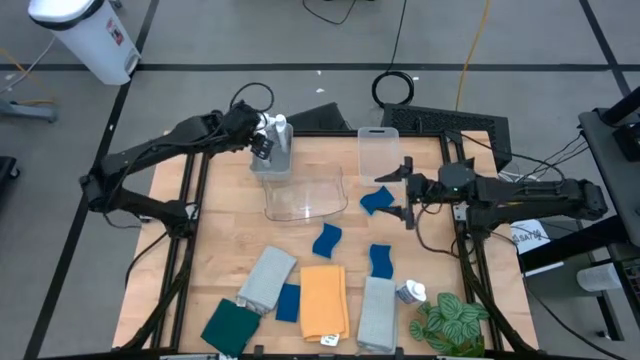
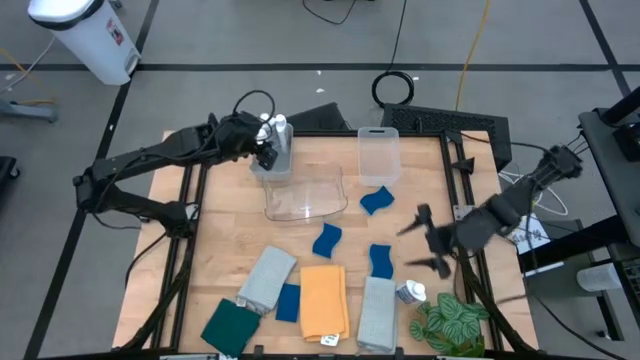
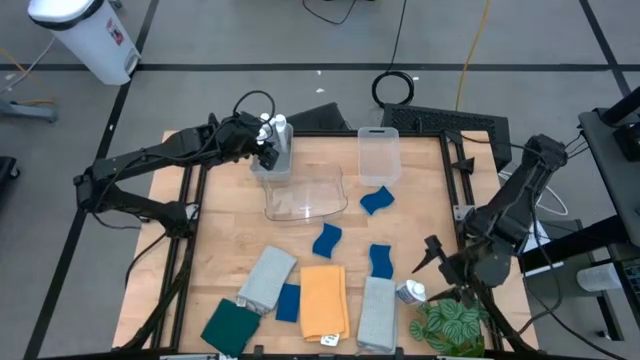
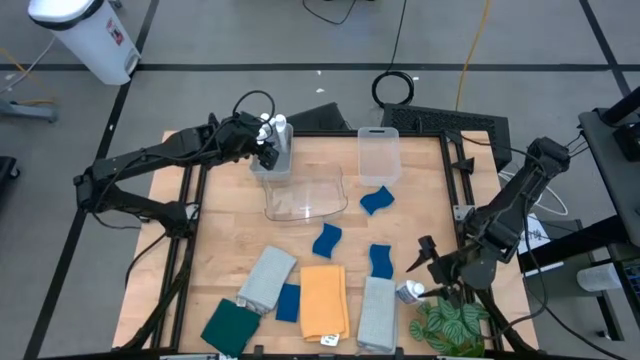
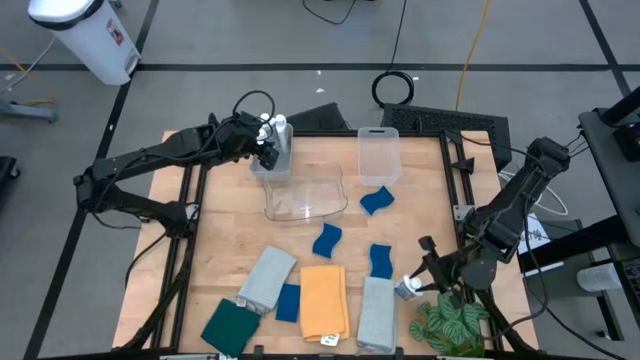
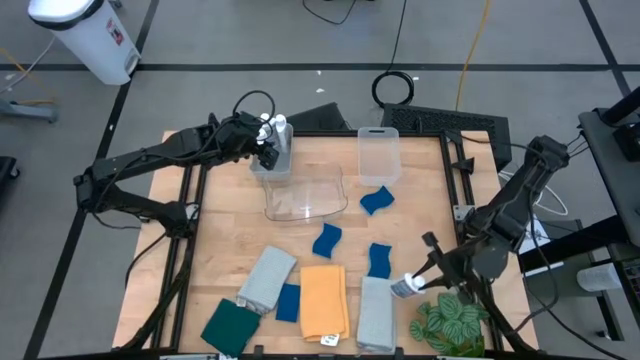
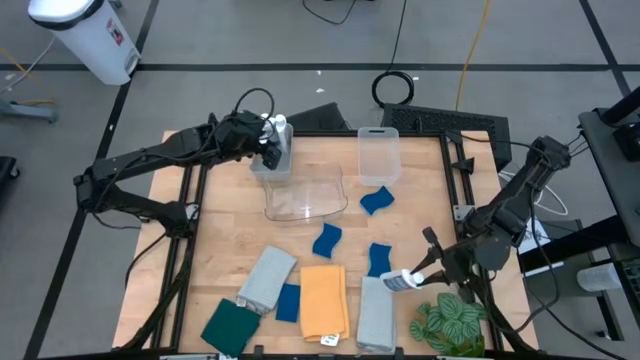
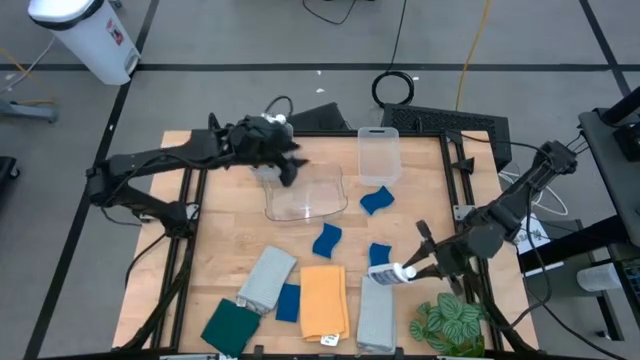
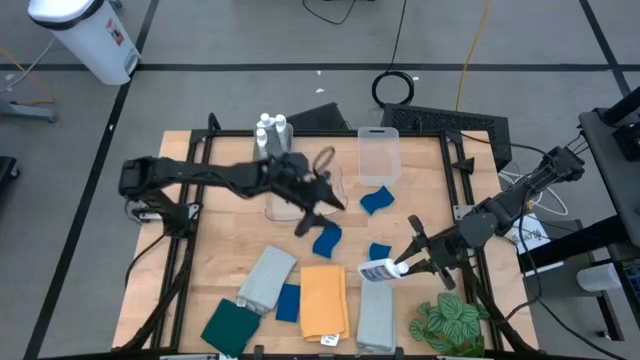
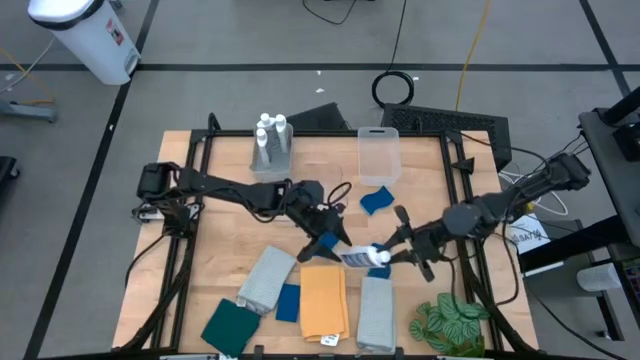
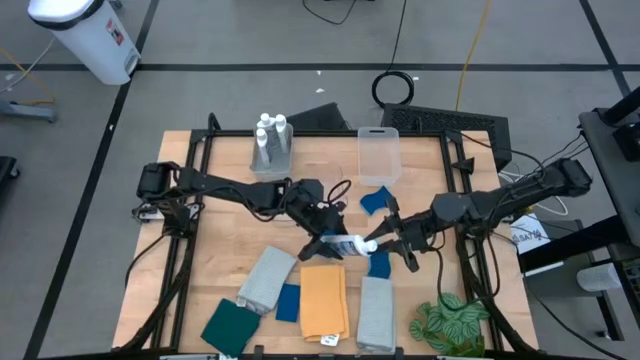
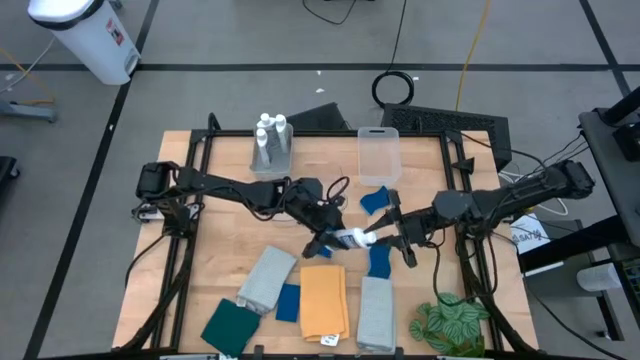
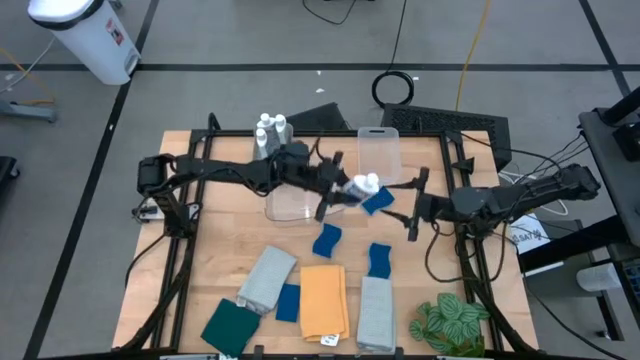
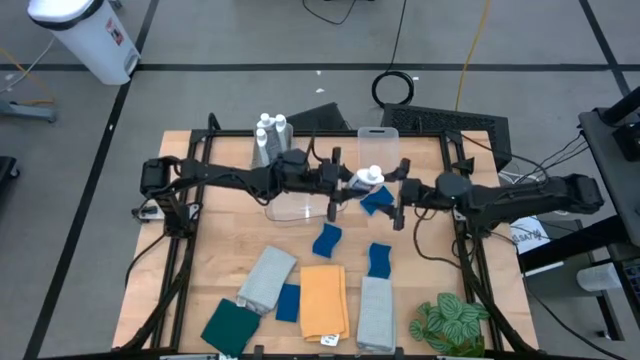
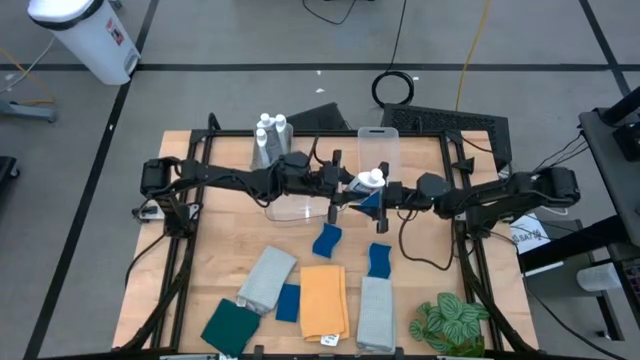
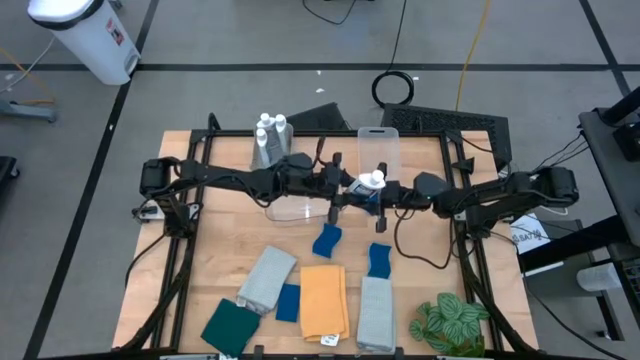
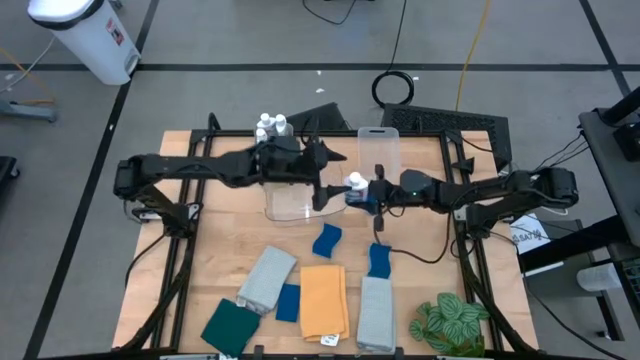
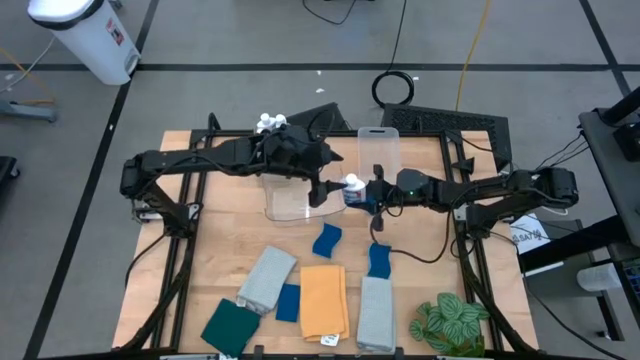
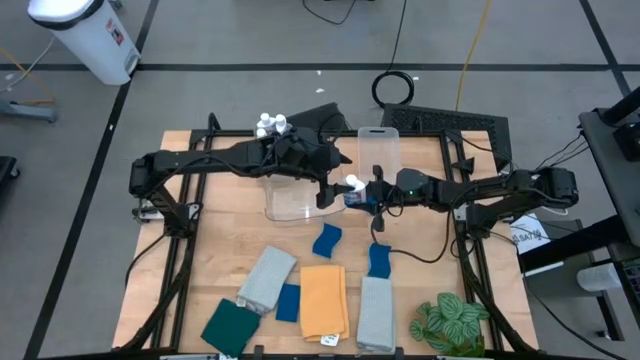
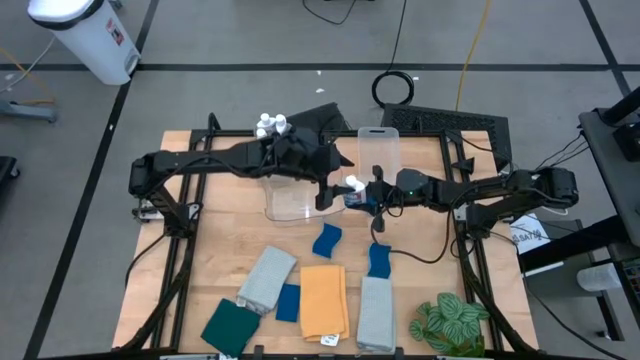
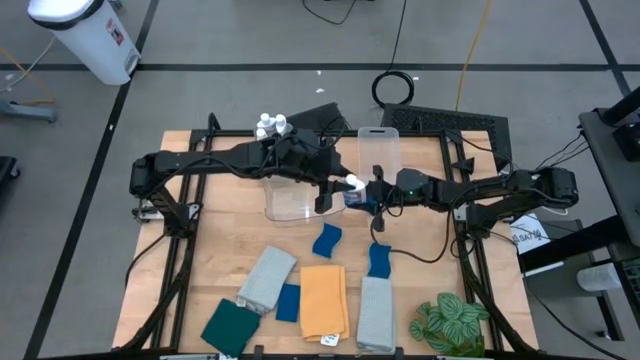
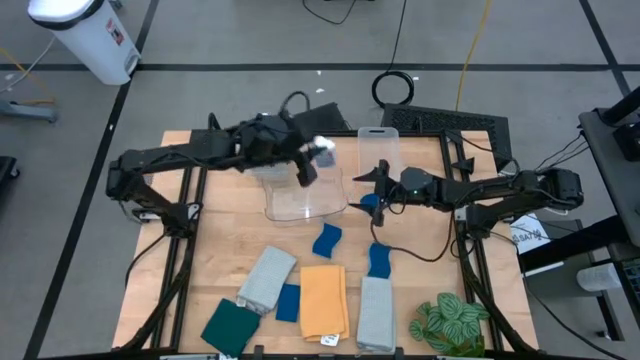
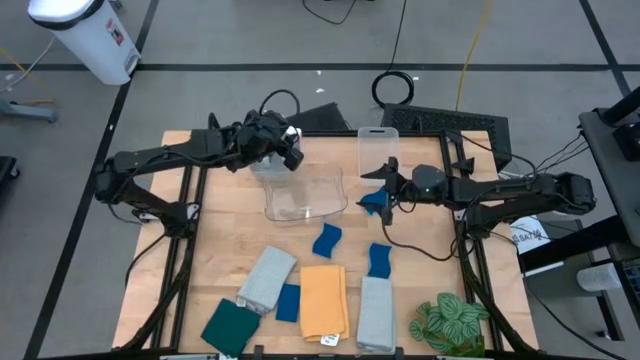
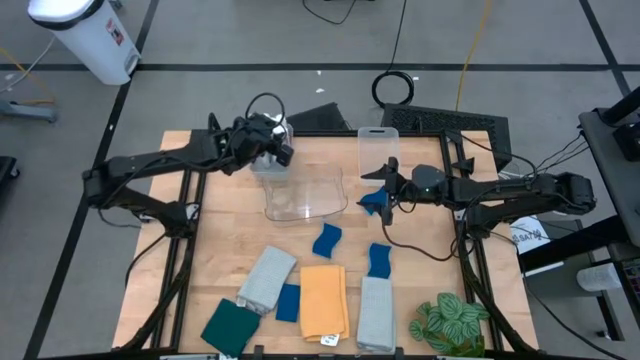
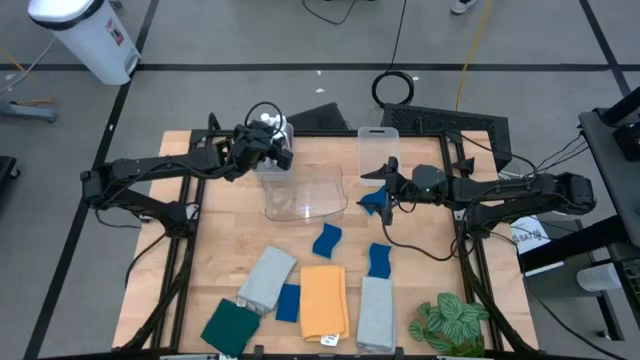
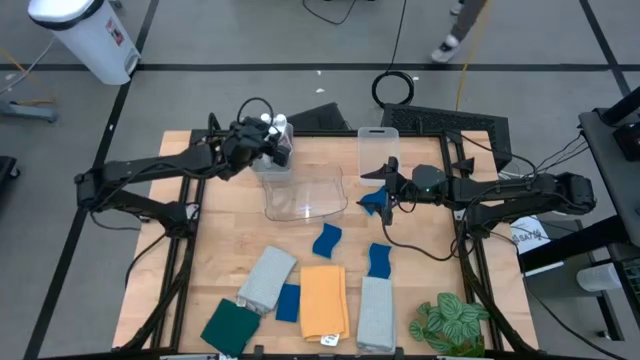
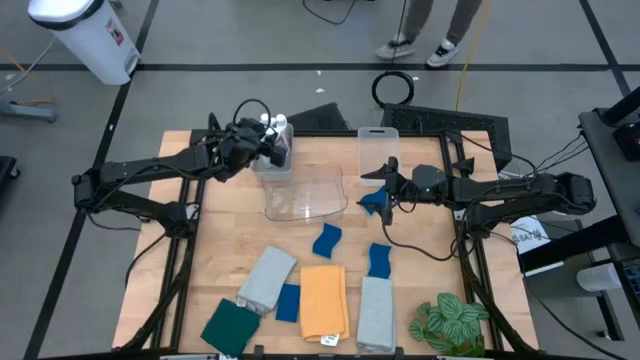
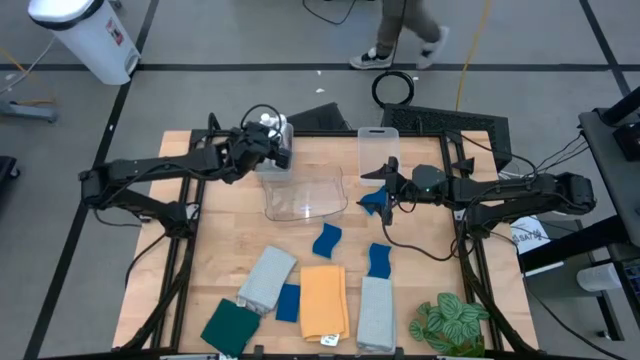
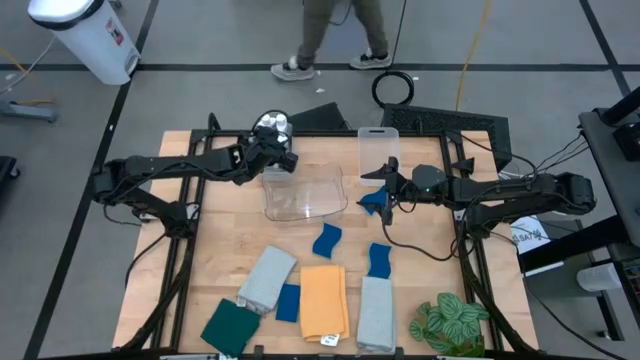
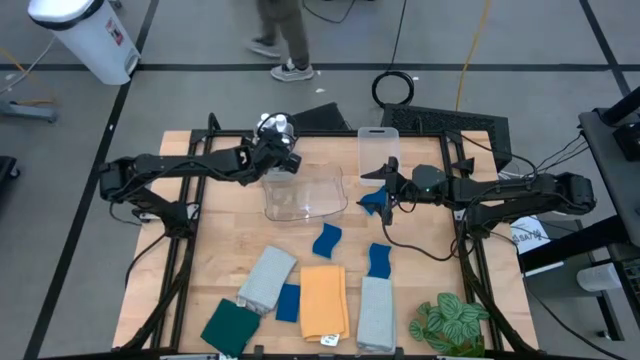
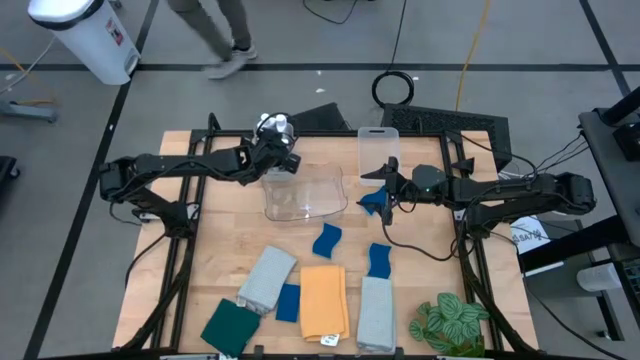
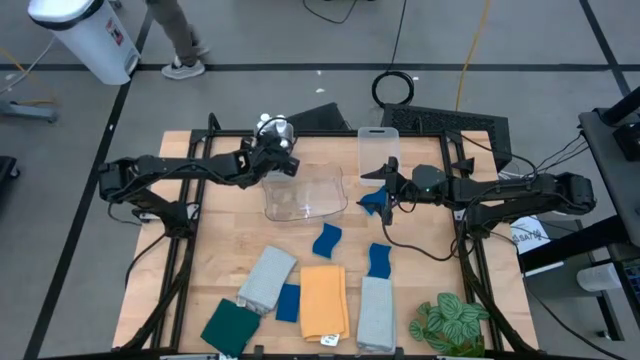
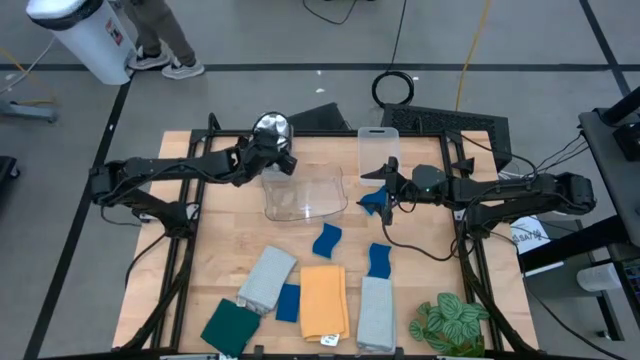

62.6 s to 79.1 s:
Task: Pick & Place Kitchen Items
Put the white plastic restorer bottle into the gray bin

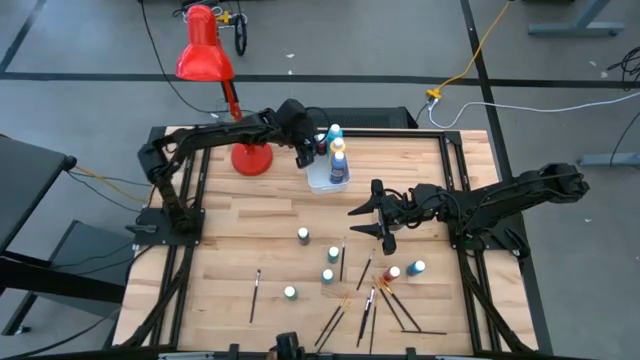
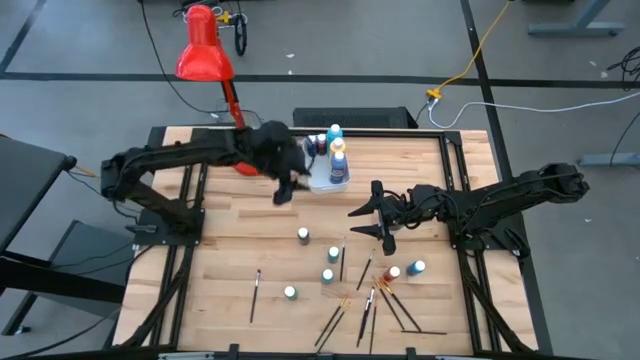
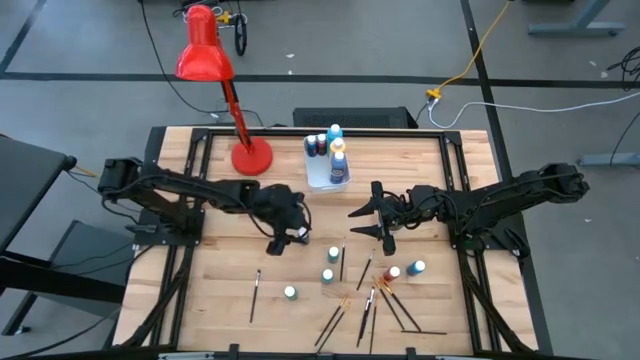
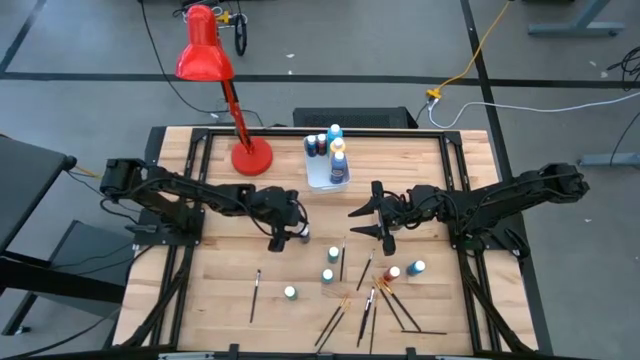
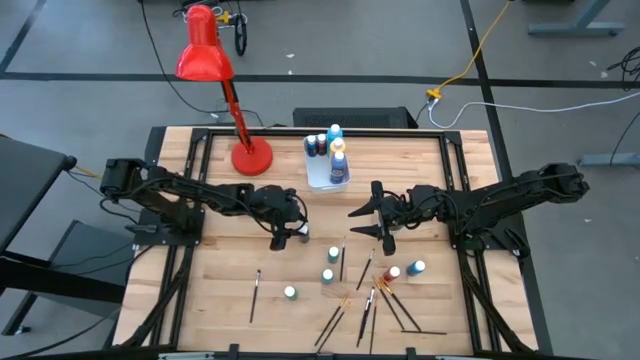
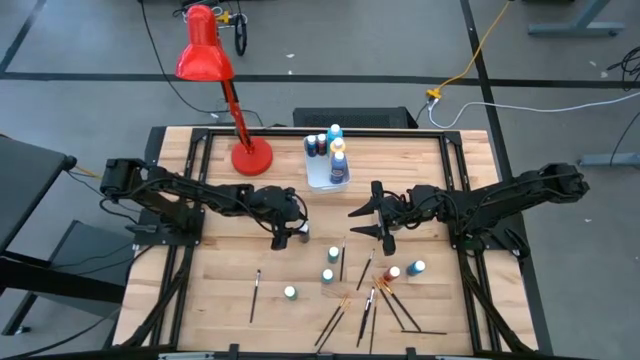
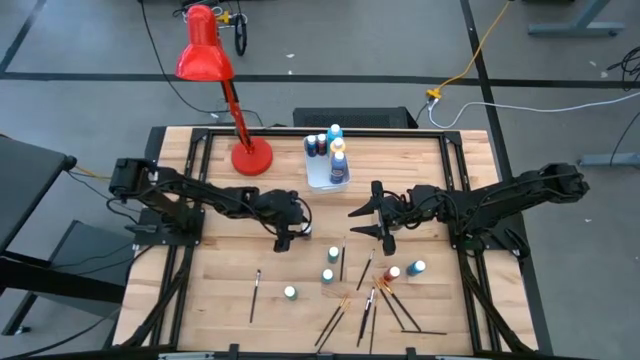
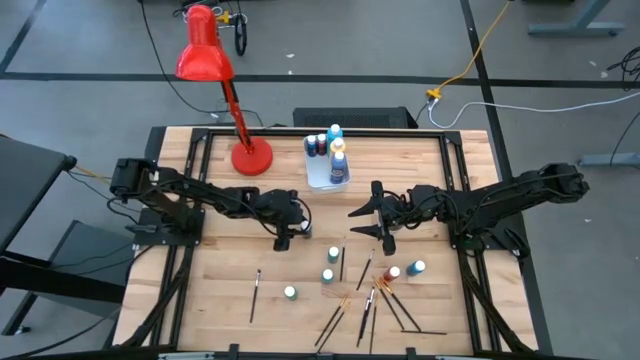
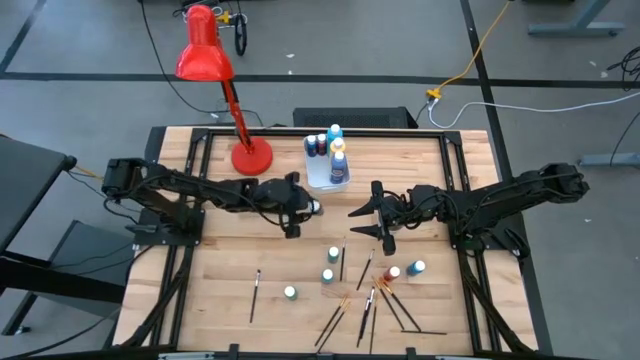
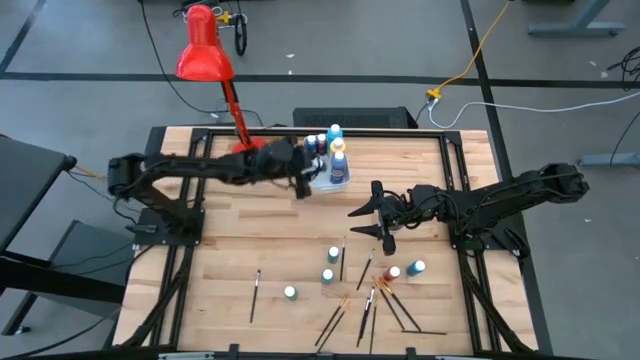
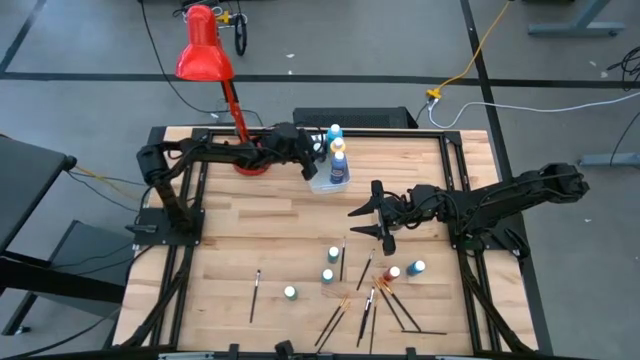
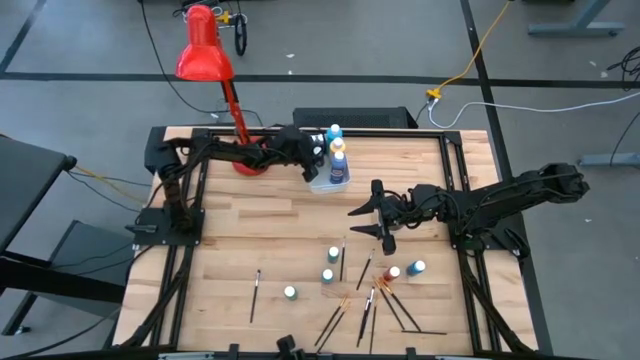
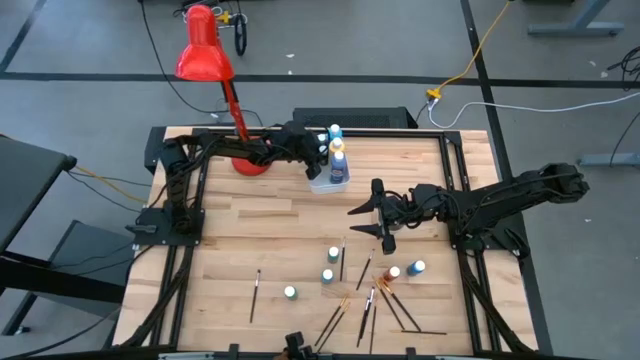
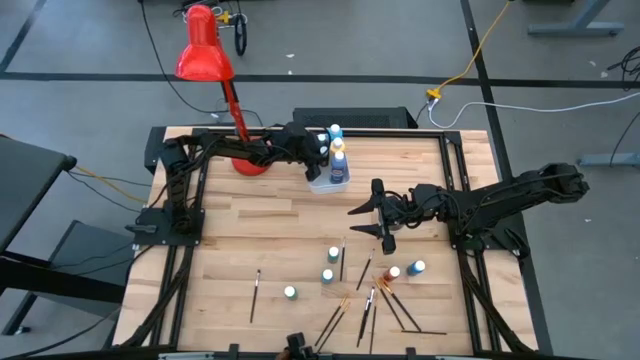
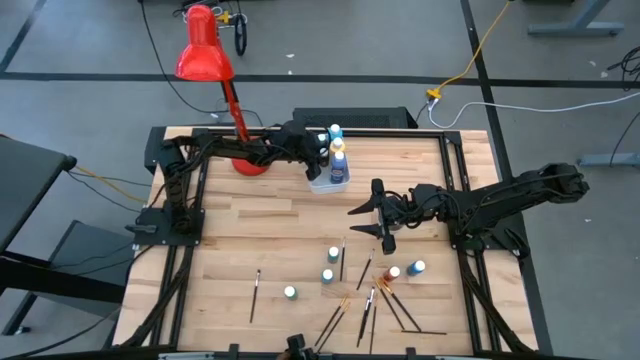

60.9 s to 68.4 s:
Task: Pick & Place Paint Supplies
Put the small black paint bottle into the white bin
